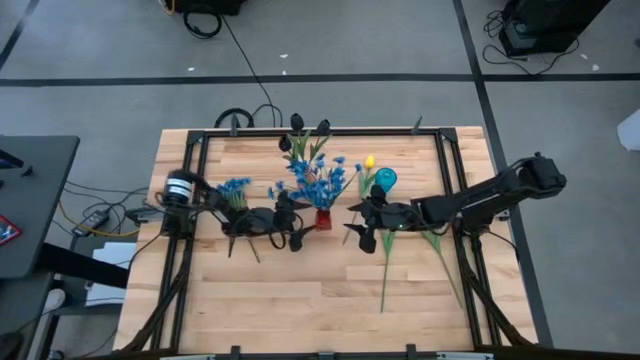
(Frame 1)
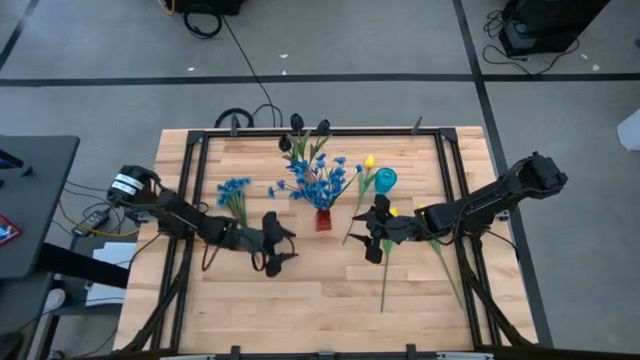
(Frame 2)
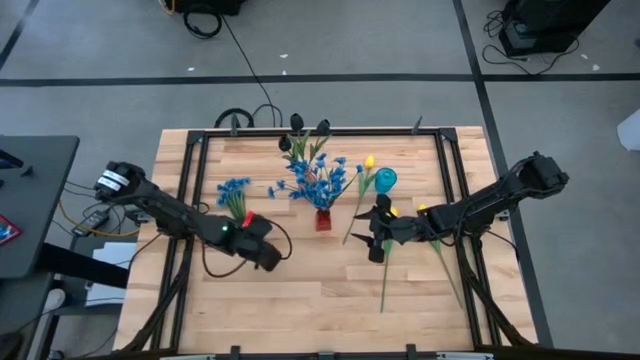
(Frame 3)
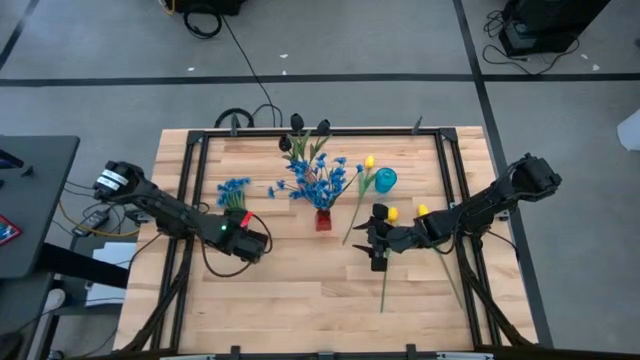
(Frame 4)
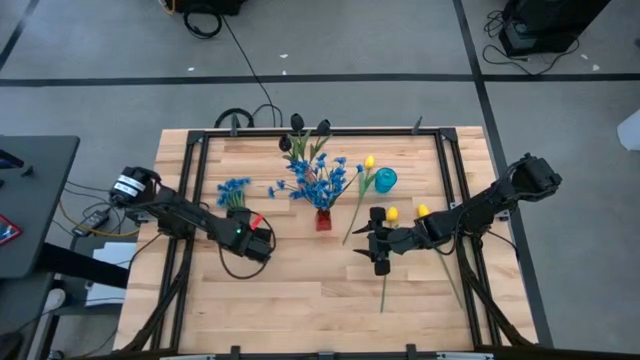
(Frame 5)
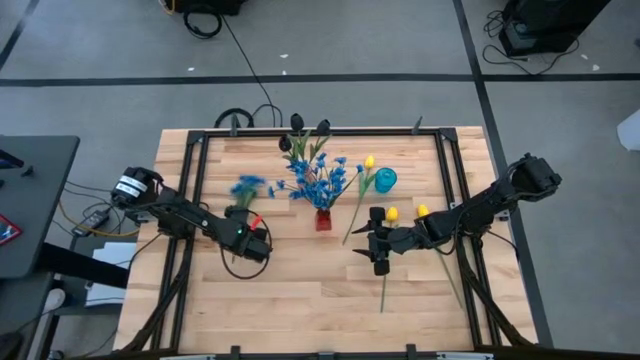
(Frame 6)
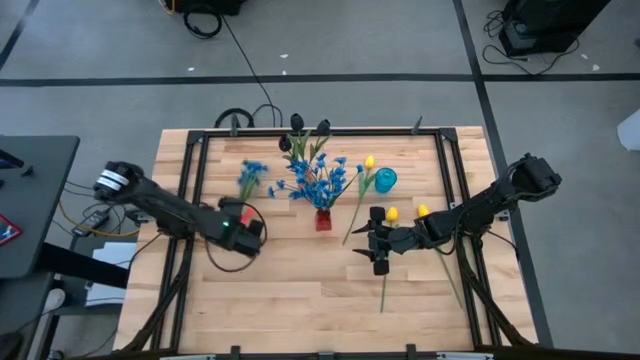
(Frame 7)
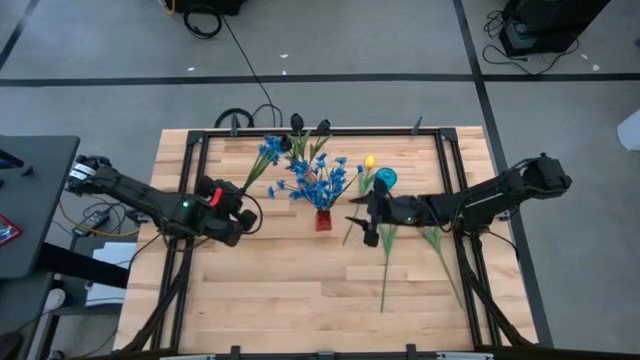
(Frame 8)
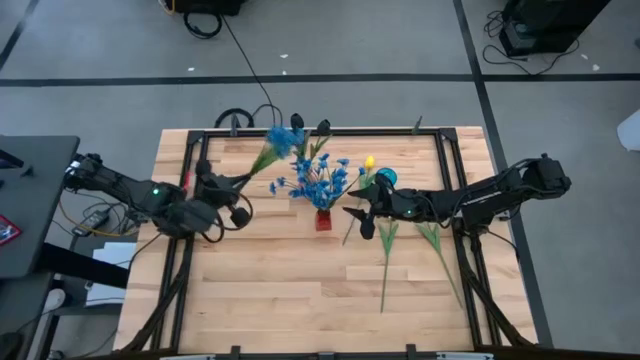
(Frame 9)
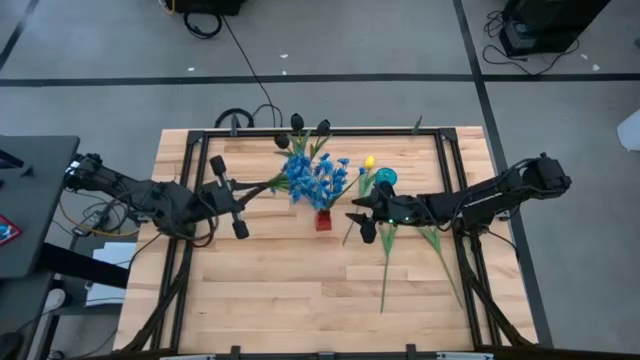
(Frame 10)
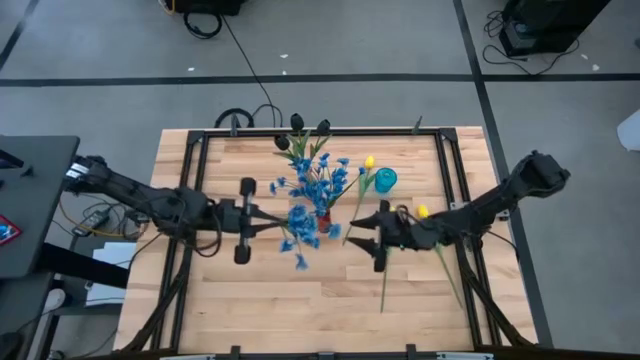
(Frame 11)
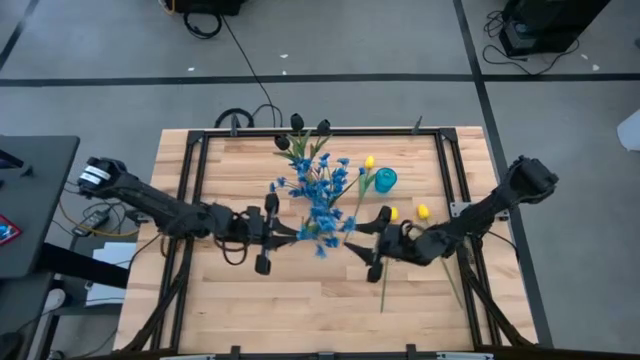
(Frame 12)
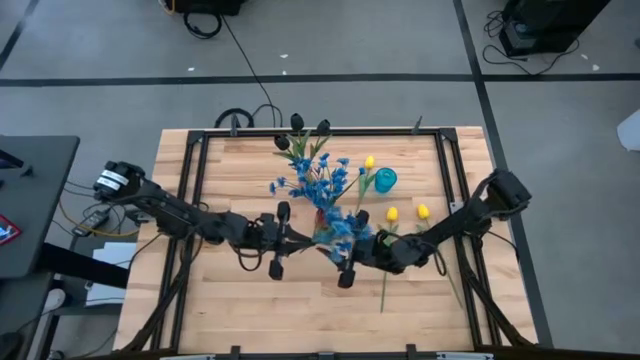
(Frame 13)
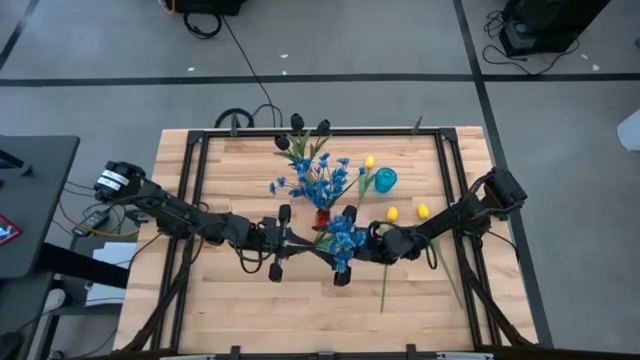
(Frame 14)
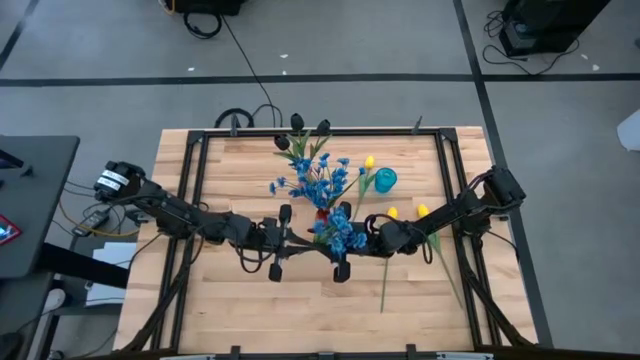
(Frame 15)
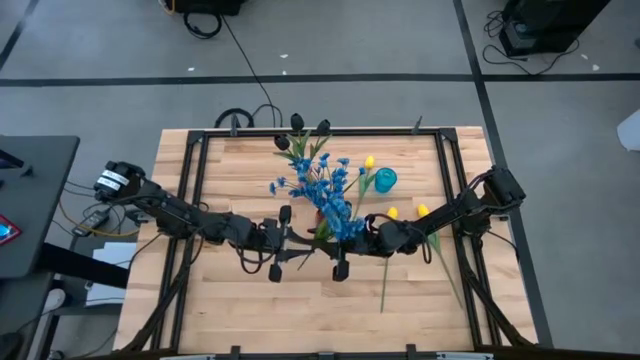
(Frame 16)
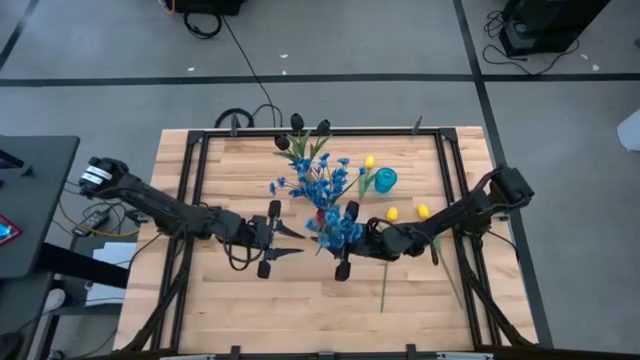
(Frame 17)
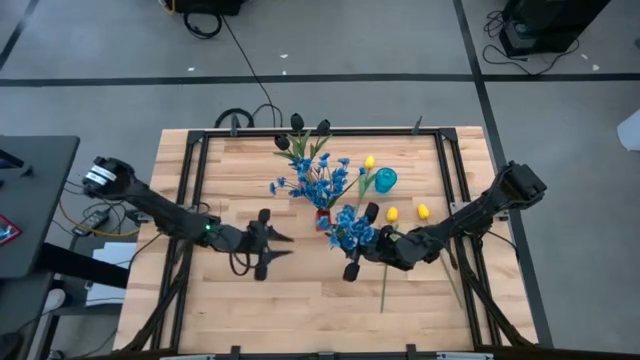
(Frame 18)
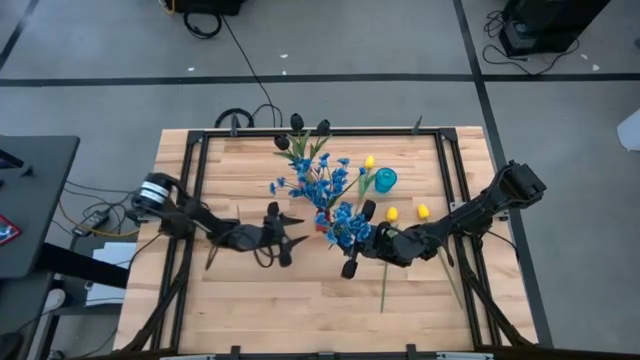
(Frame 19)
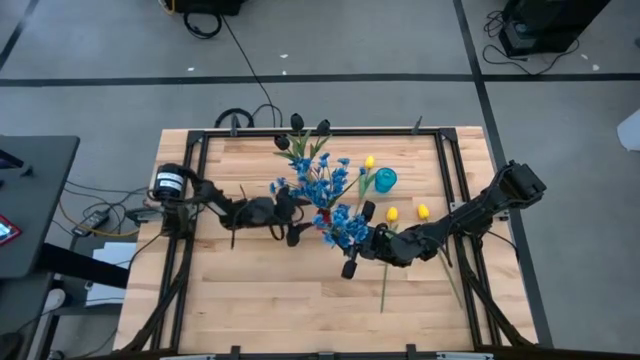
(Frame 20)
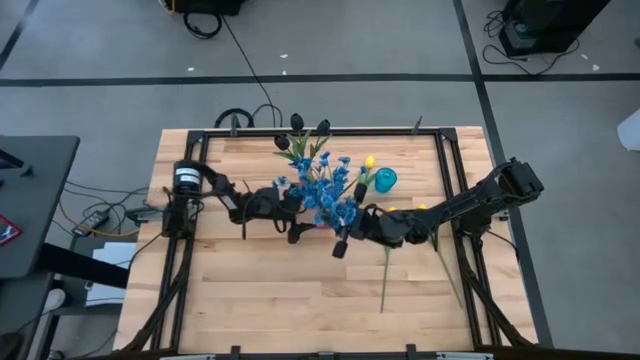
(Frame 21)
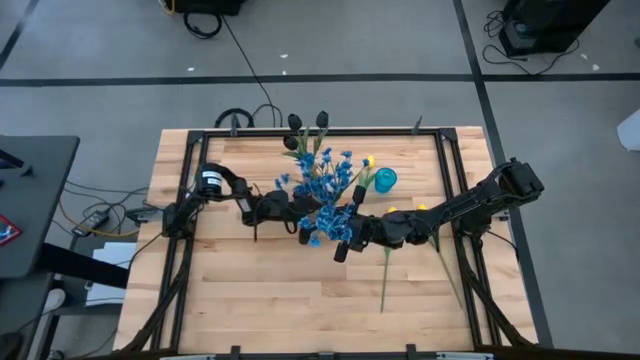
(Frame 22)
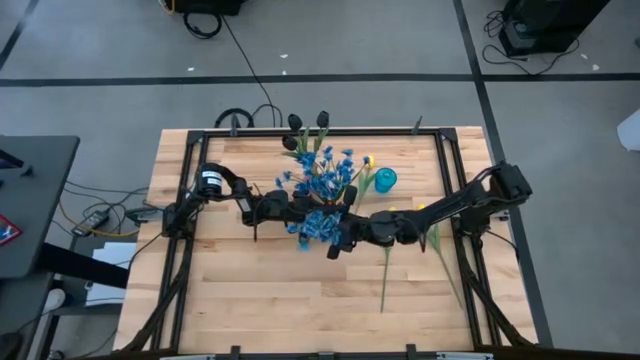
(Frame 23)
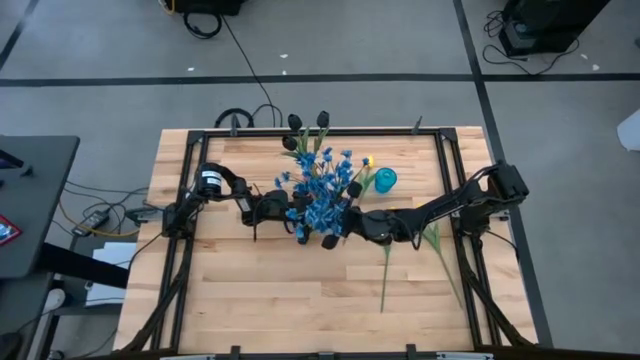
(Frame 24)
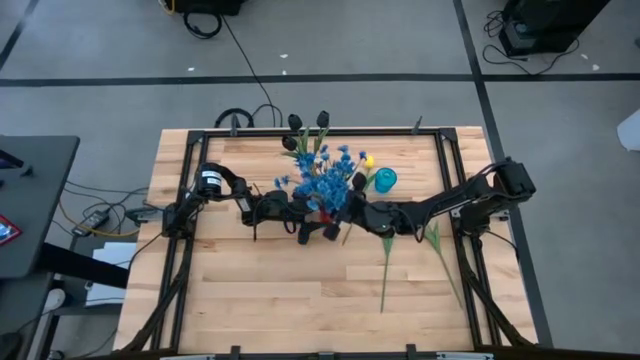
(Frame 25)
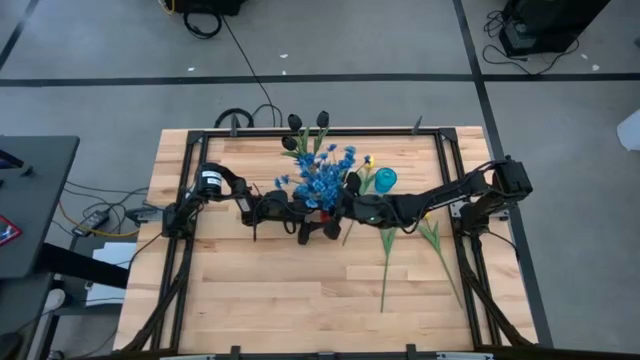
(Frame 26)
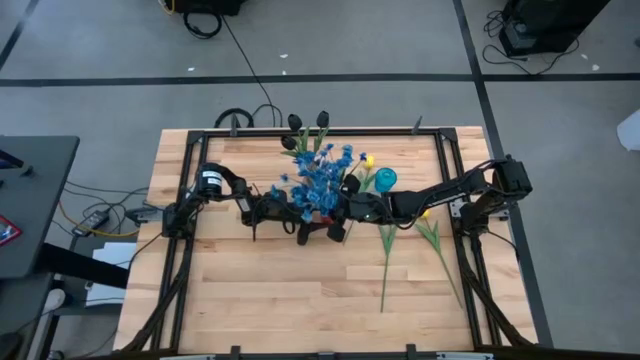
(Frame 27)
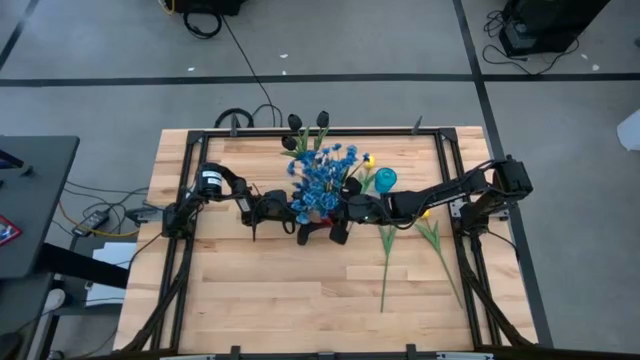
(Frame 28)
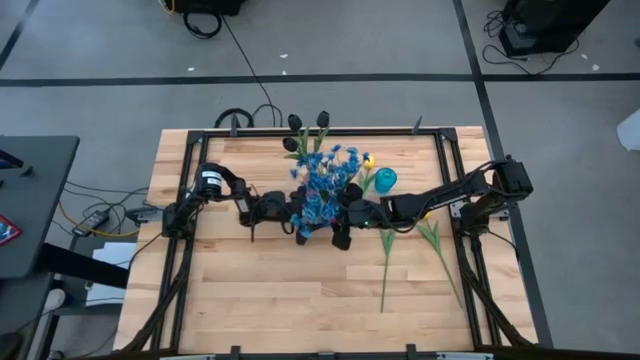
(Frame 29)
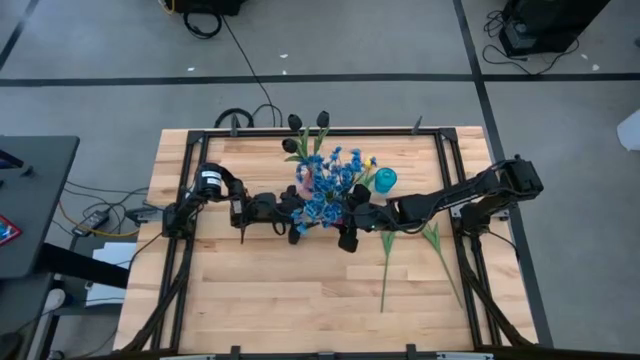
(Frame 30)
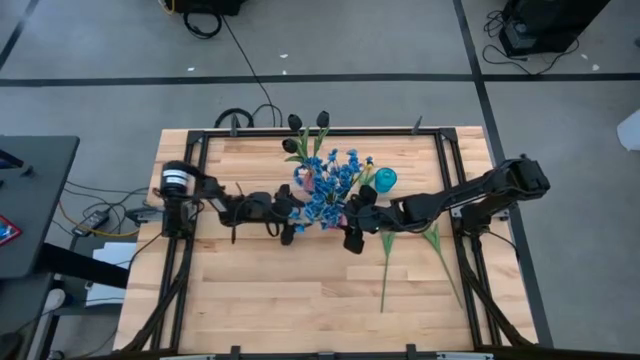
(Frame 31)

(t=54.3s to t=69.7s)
Task: Sort flowers into vase by color
Put the blue flowers into the red vase

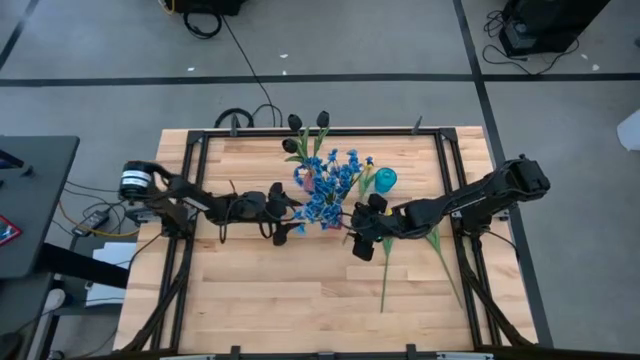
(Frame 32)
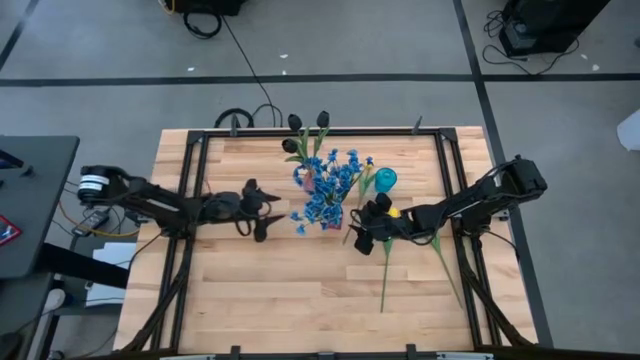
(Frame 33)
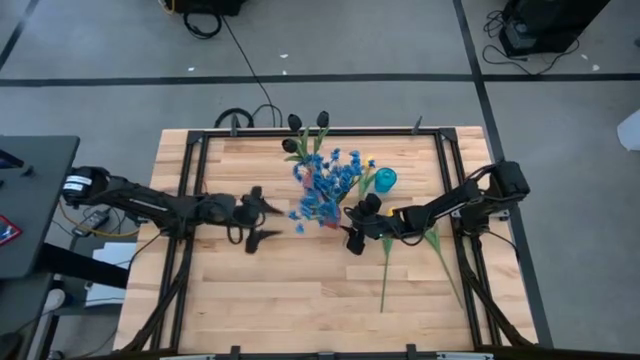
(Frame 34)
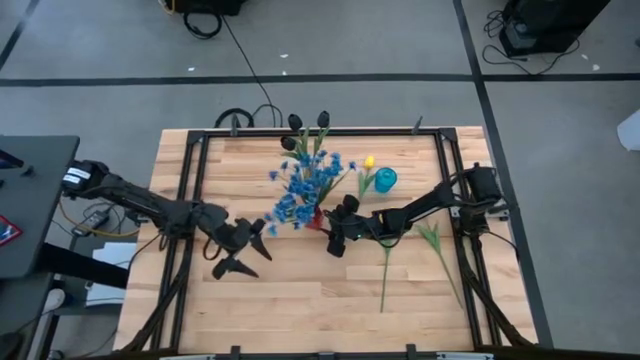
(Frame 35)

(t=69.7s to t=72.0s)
Adjust the red vase

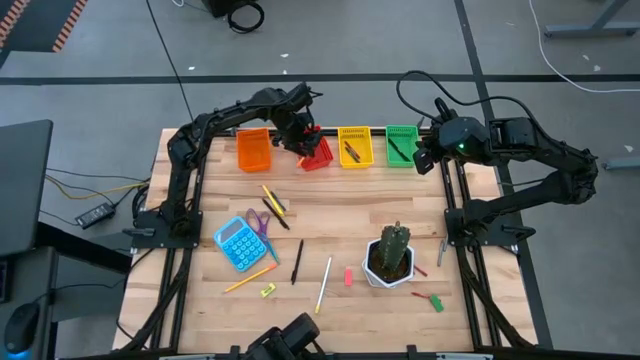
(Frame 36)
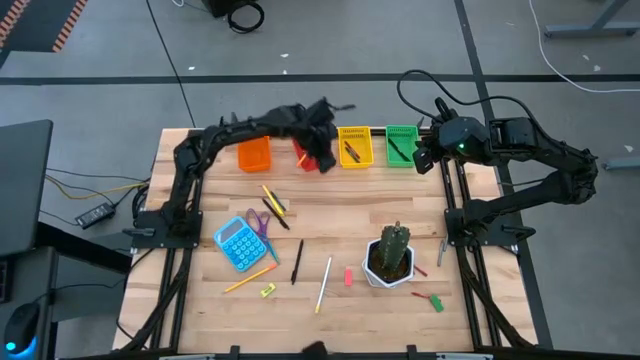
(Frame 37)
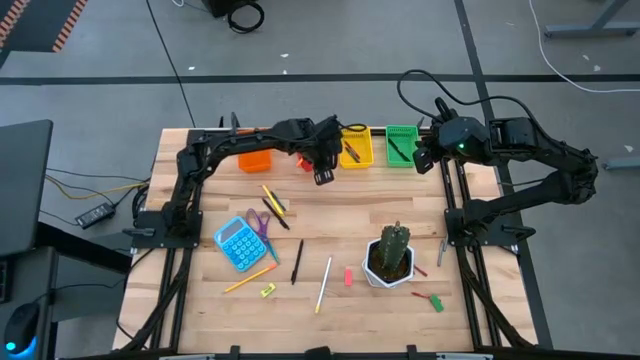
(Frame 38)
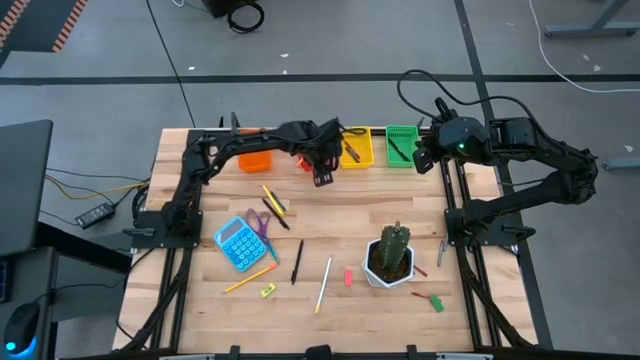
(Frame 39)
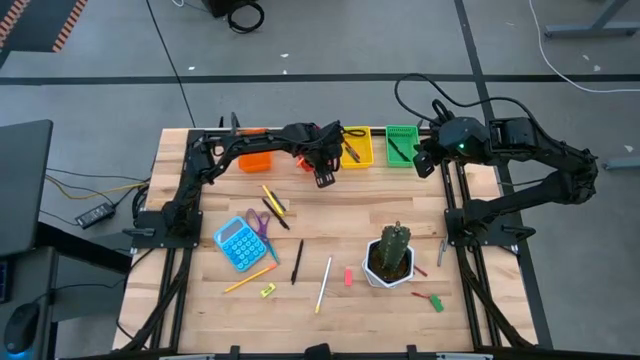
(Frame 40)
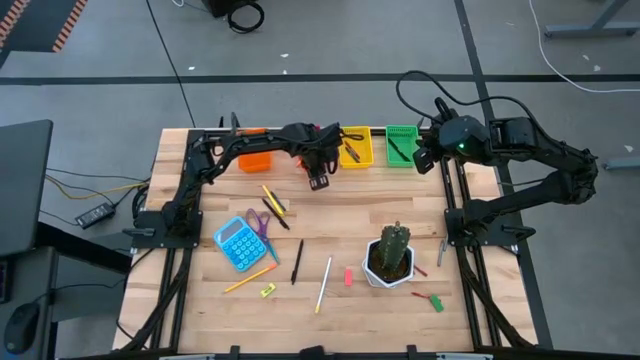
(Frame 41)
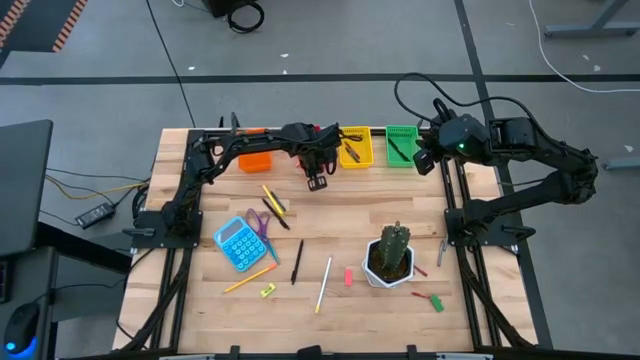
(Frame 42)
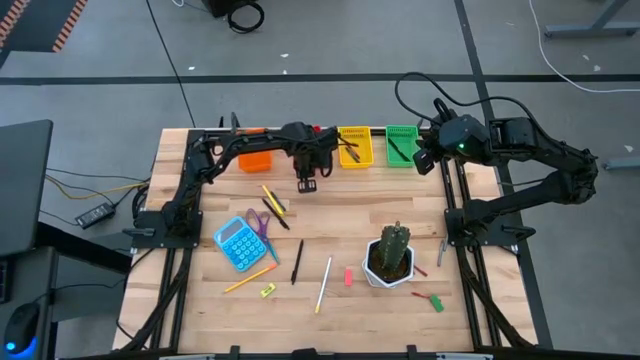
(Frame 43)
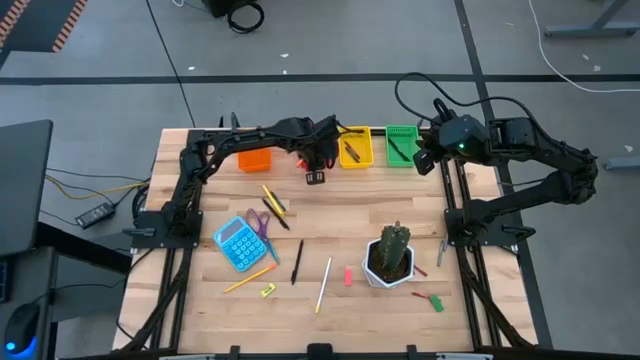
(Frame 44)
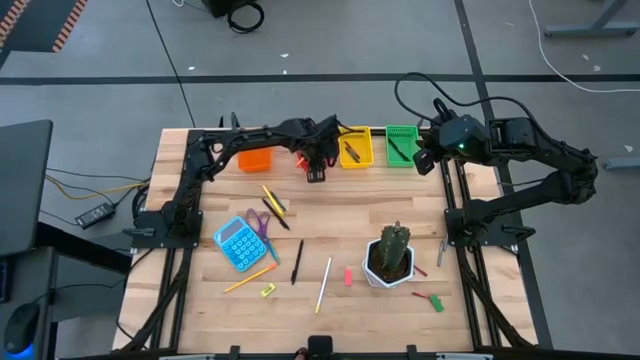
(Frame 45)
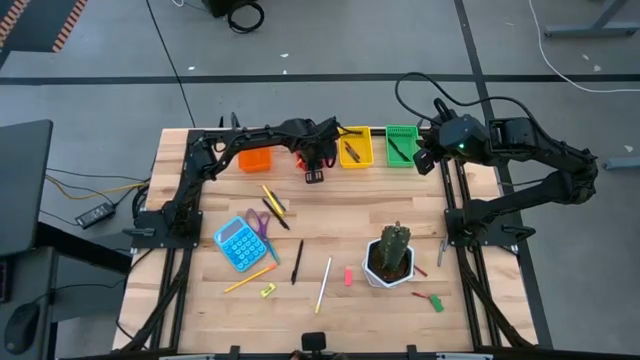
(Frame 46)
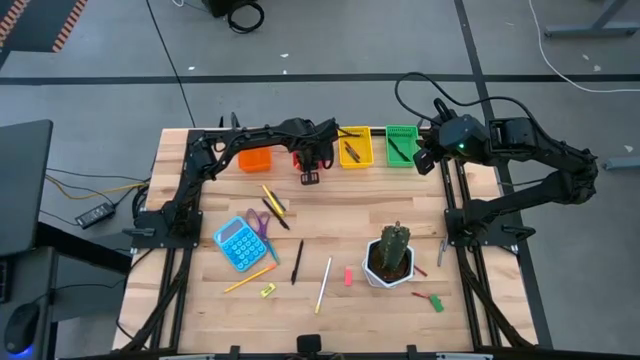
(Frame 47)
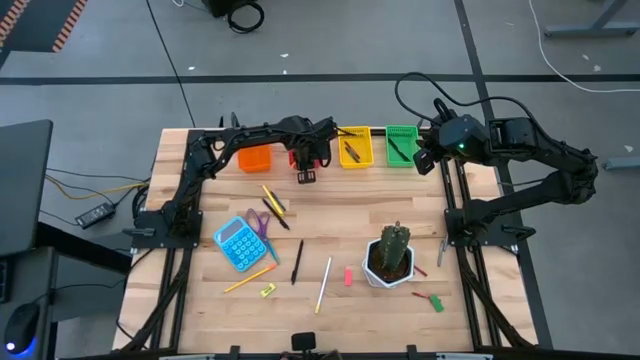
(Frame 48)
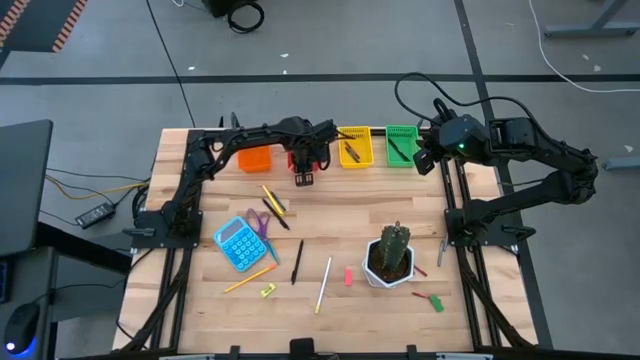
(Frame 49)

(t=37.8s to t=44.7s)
Task: Sort crayons/erasers/pens/pencils in bins
Adjust the red bin
